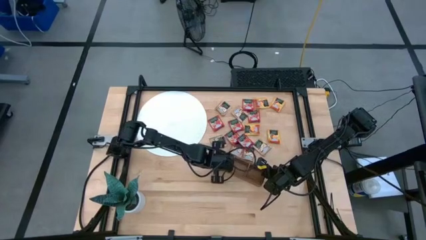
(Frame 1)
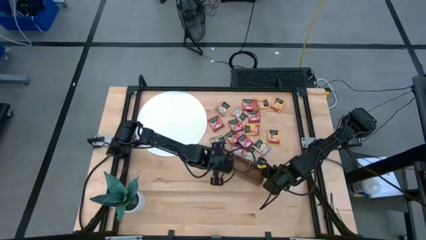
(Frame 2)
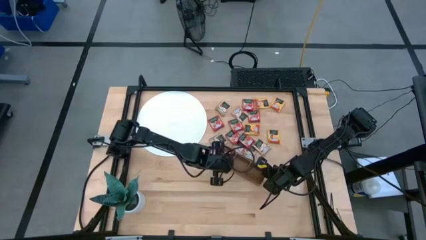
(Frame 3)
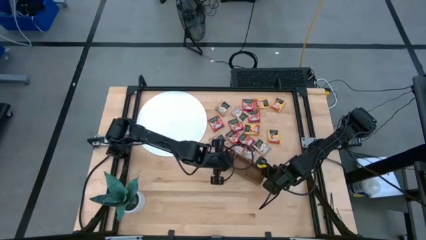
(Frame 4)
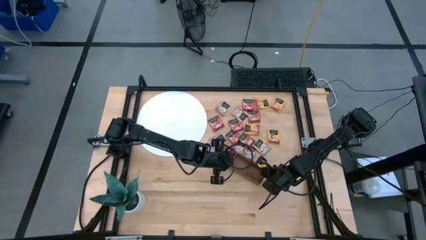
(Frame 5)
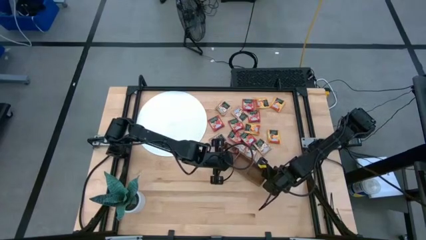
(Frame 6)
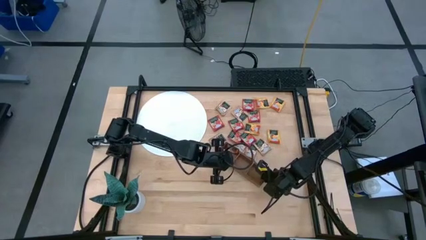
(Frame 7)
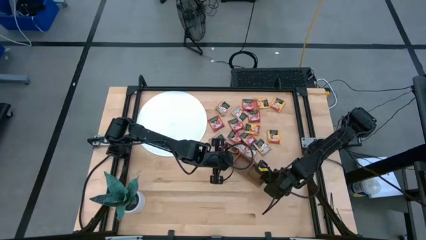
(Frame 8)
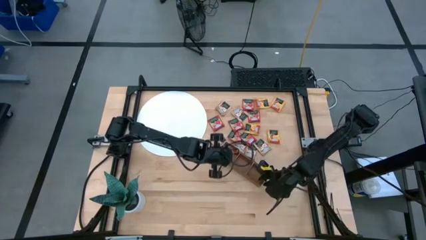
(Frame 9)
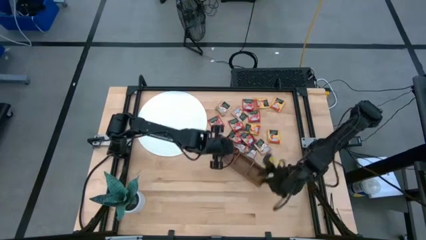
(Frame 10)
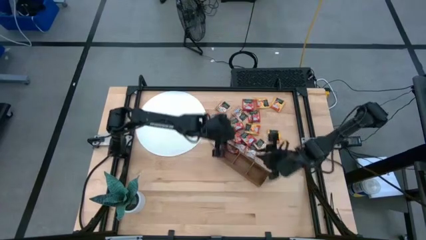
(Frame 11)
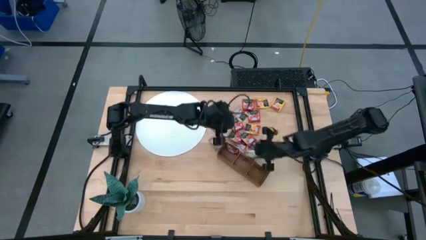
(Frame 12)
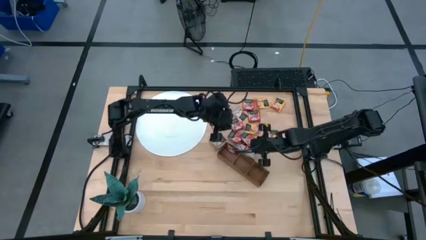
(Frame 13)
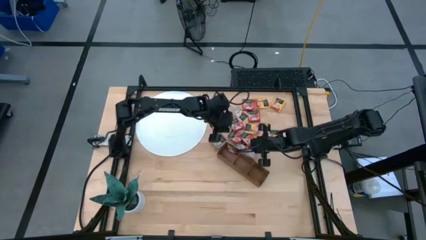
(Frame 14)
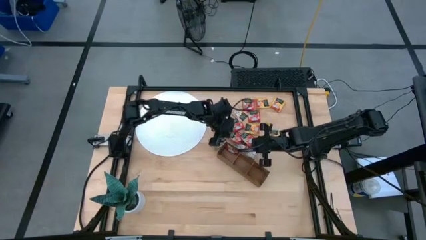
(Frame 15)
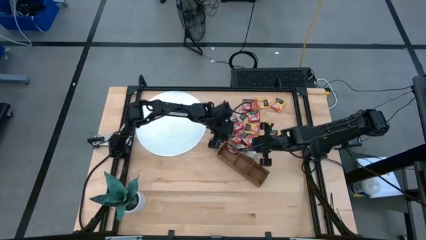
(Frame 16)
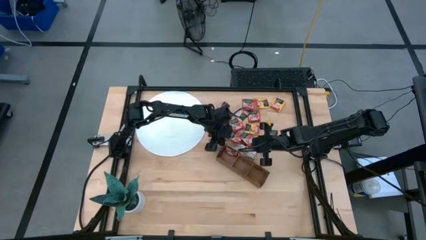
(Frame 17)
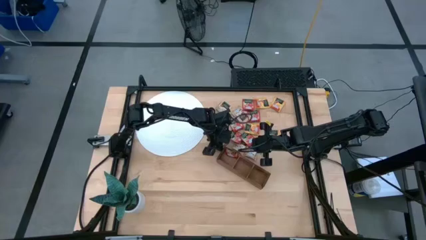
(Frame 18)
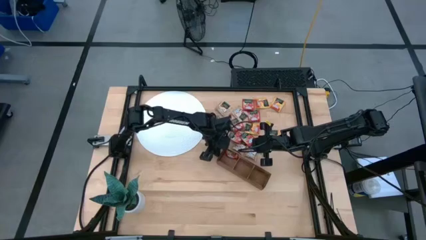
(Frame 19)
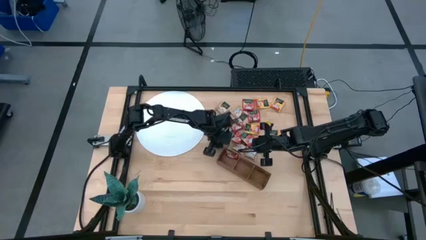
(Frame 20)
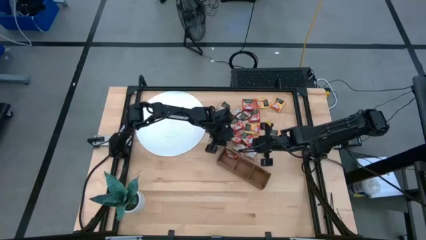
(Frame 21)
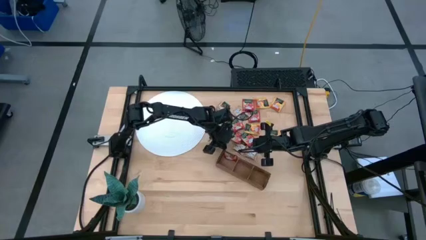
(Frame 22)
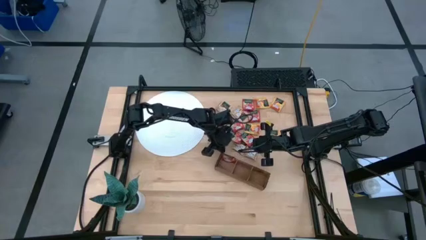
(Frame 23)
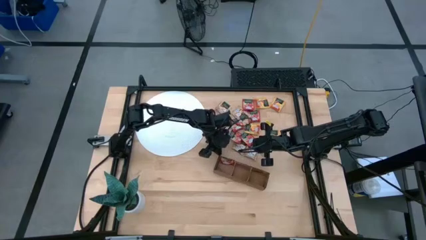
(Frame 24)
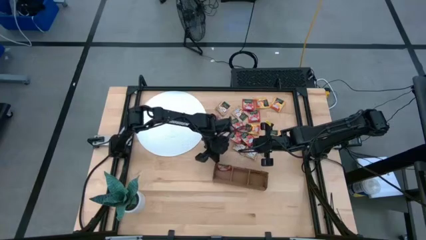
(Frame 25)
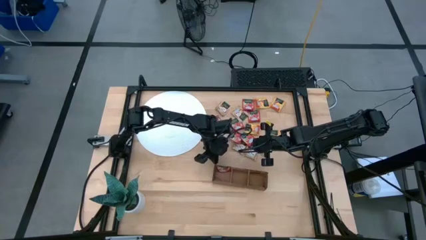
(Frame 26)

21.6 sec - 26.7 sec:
Task: Pick & Place Tea
Adjust the wooden organizer

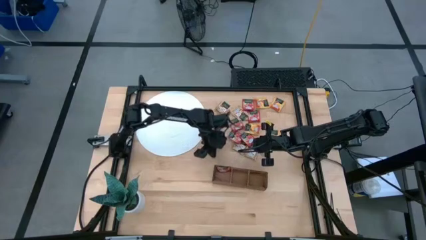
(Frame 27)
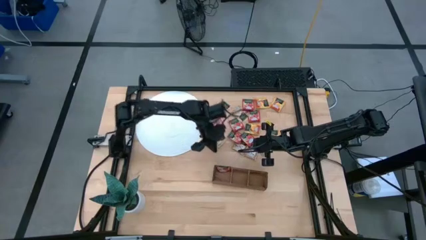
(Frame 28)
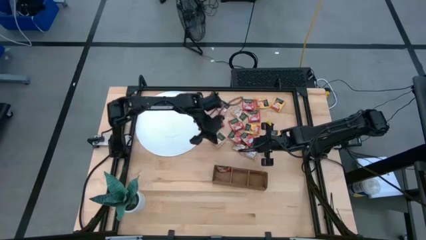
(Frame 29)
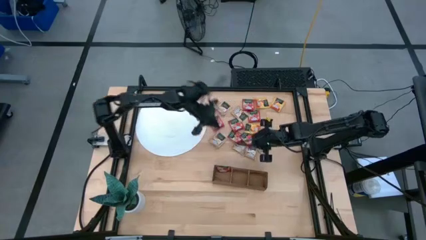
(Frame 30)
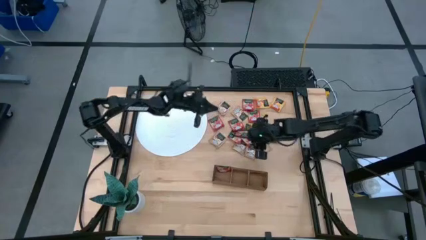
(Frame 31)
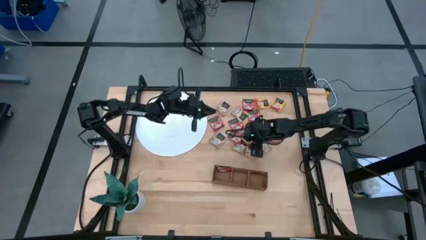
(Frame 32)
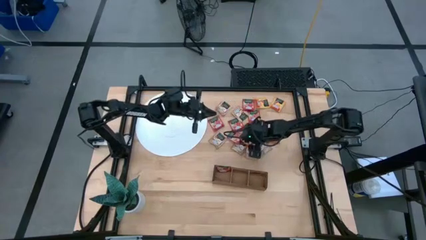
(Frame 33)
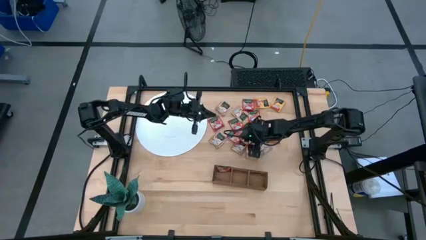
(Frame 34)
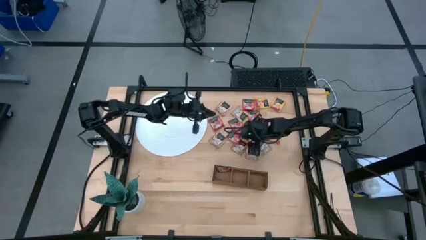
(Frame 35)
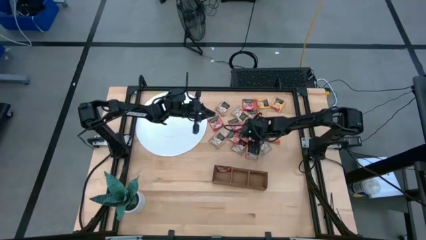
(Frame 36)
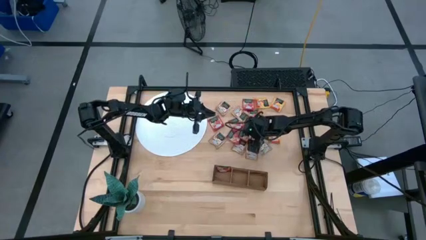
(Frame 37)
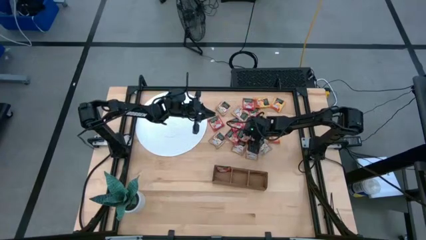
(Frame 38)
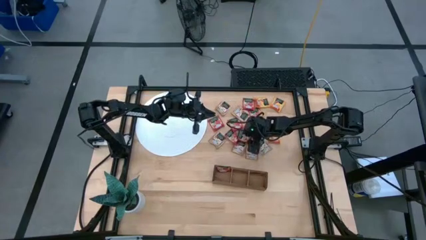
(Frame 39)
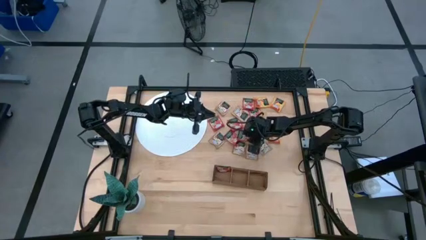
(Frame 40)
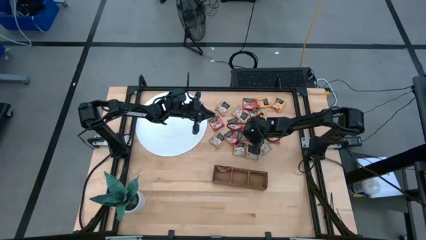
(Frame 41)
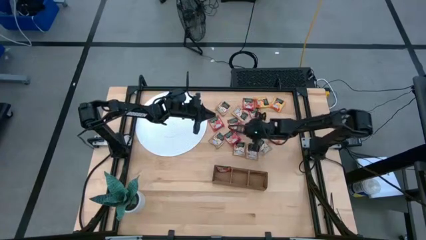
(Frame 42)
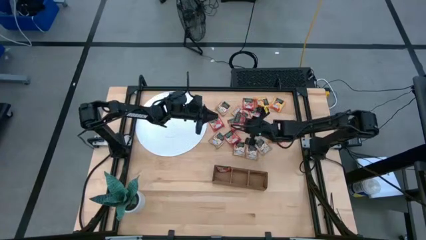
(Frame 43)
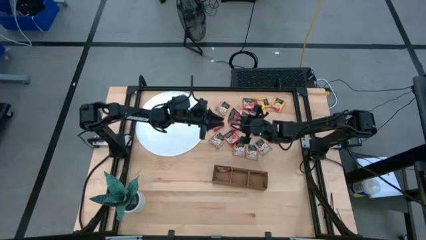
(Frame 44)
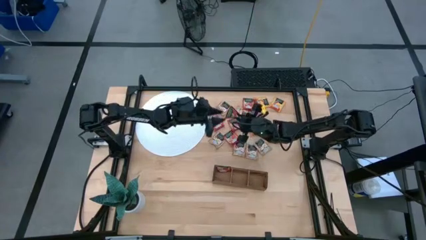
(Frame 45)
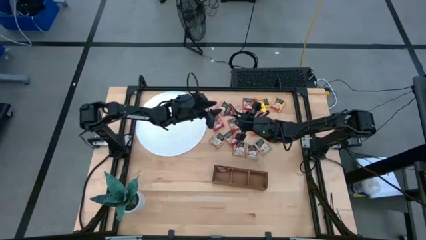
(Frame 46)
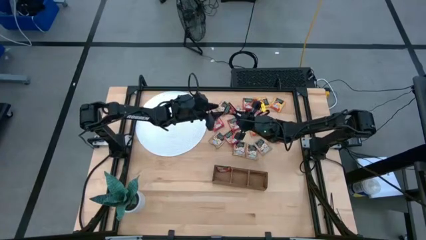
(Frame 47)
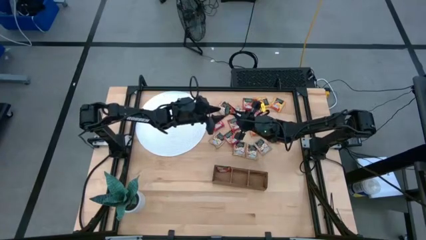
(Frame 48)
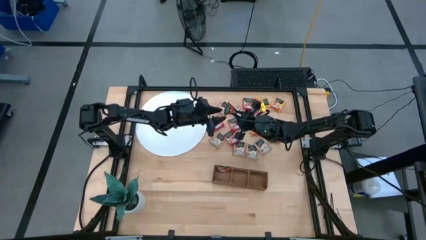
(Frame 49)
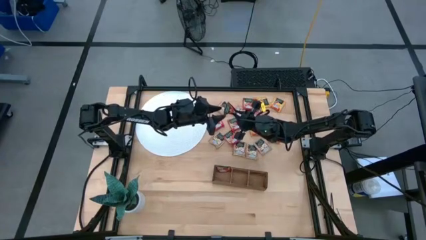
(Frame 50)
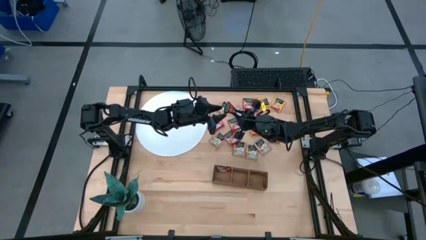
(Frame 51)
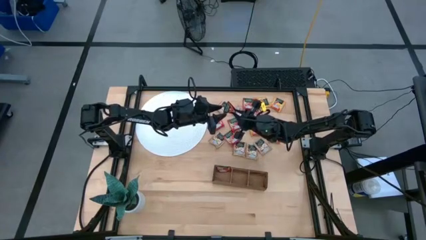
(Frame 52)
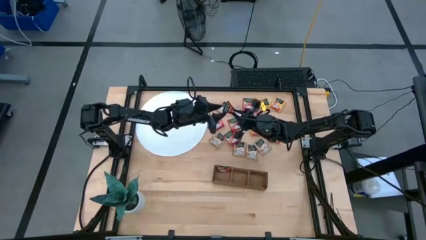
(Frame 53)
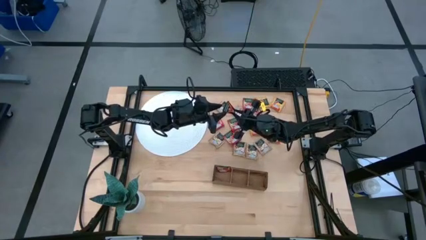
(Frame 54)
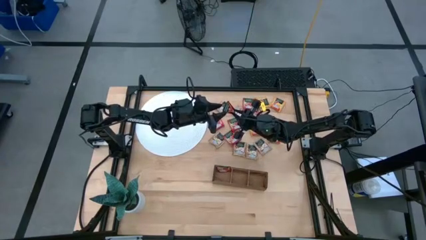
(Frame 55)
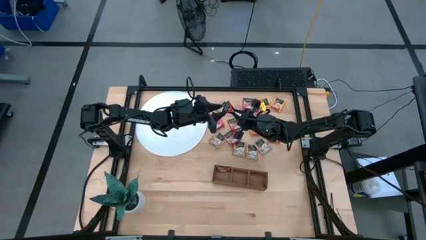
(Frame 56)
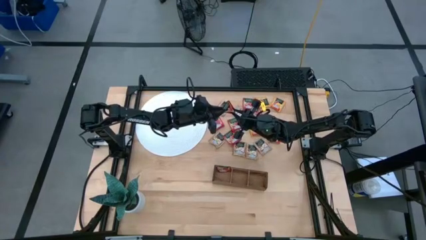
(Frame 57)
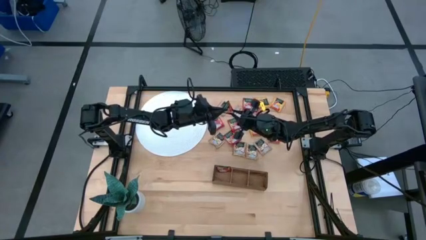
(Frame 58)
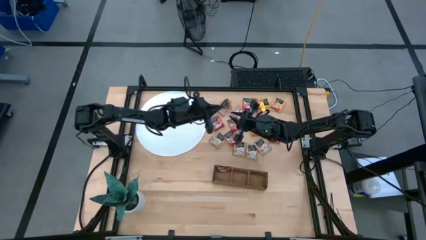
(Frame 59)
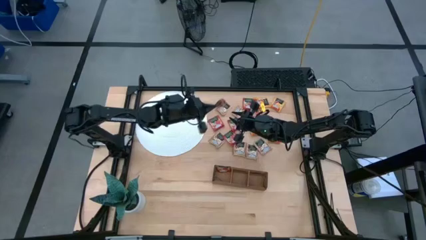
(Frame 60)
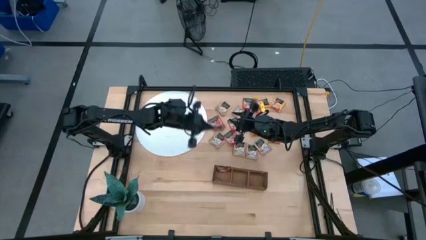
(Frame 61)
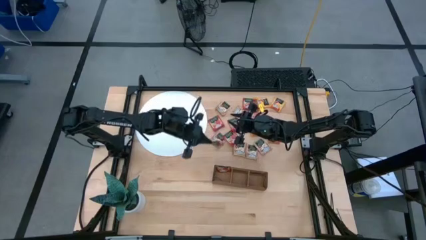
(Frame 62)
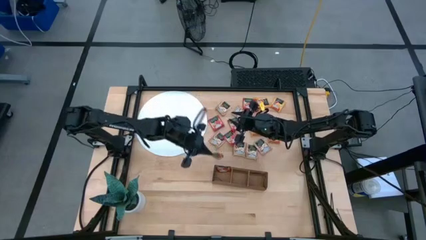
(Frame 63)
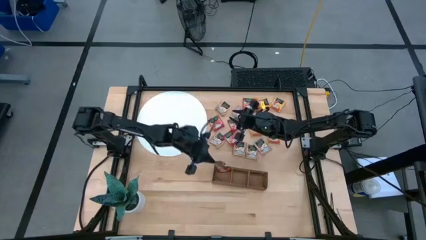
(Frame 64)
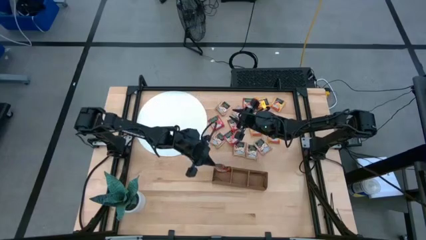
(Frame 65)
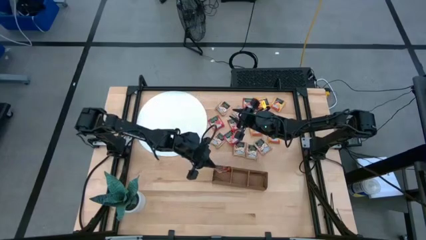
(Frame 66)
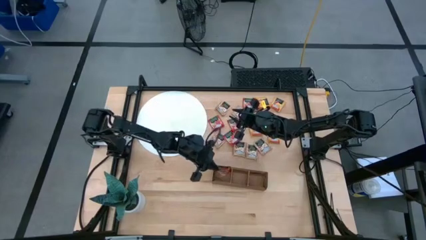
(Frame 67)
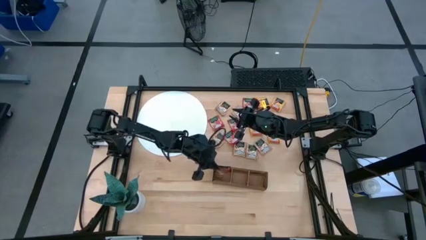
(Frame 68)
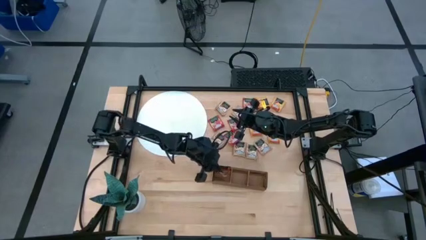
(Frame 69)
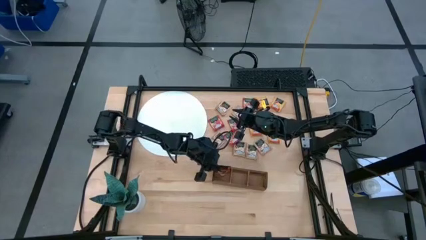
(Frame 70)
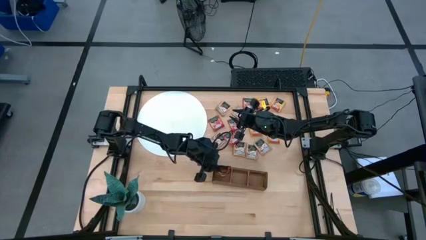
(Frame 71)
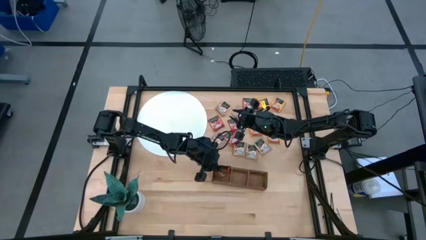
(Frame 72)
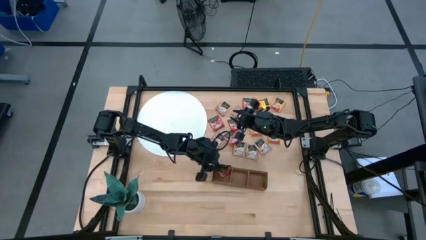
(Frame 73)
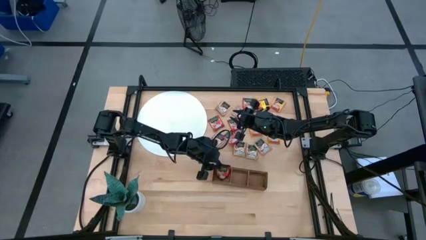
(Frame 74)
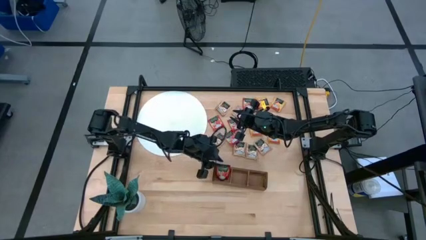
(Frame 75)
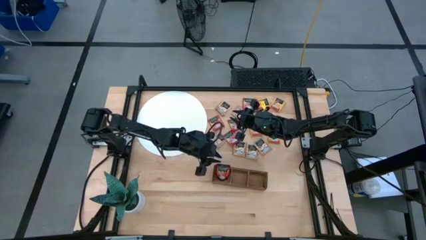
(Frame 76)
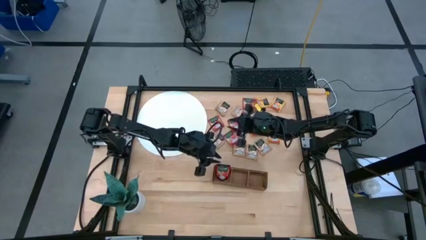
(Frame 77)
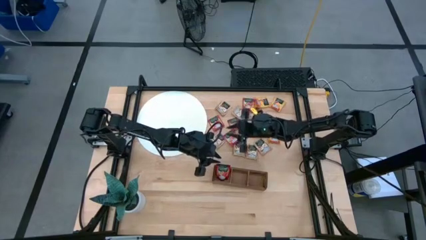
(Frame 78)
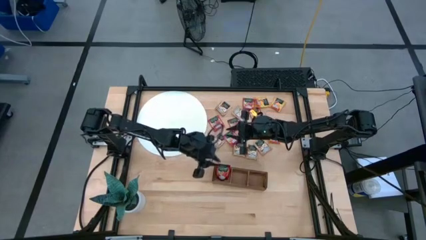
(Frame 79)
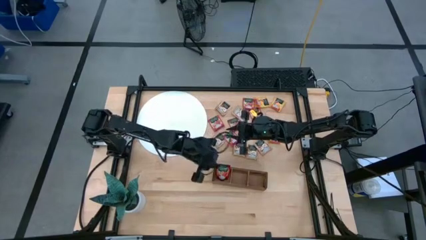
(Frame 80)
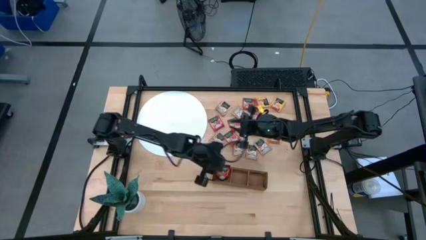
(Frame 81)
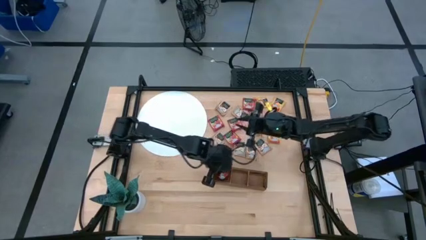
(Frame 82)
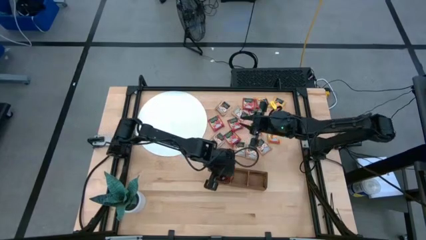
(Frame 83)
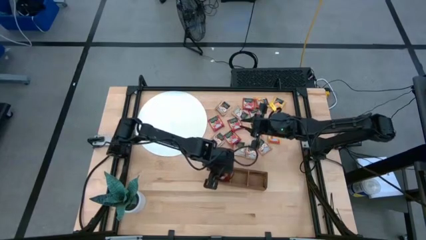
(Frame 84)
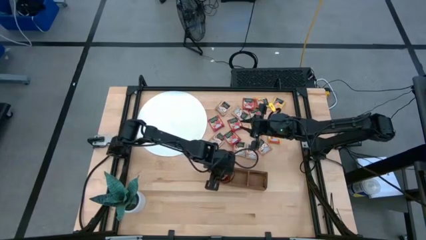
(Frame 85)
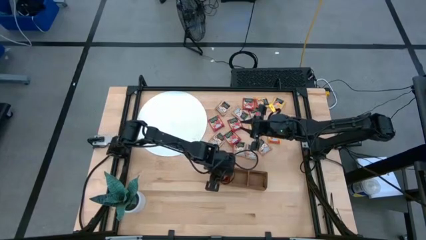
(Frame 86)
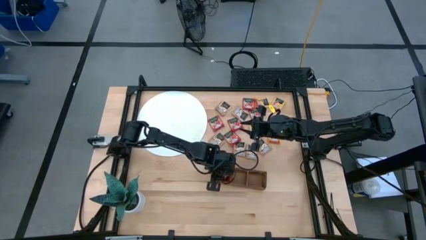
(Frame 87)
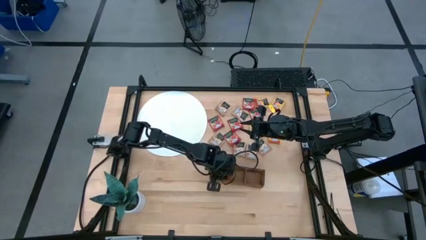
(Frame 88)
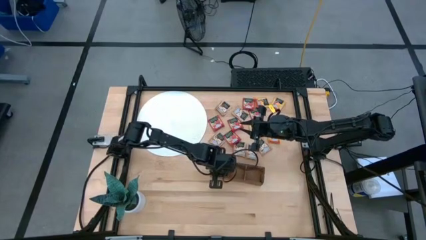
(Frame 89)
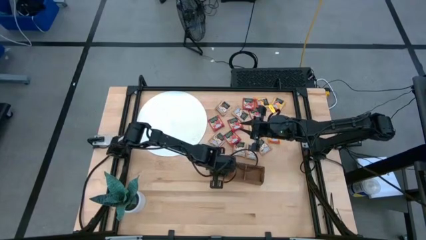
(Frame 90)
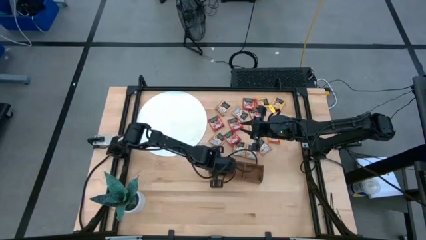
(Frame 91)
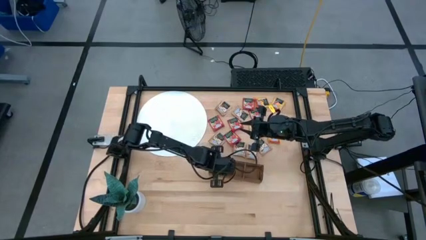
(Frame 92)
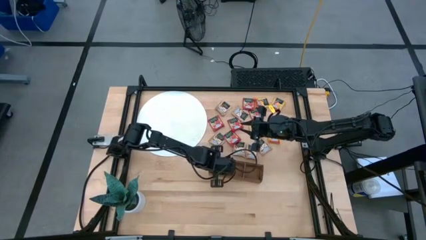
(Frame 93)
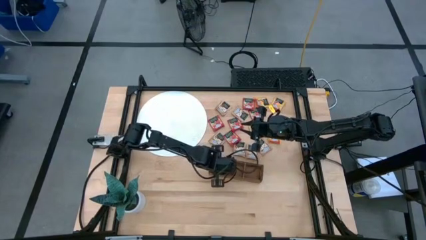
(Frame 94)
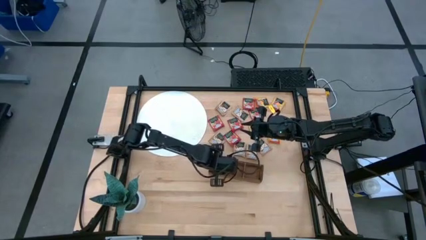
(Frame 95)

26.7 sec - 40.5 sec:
Put the red tea bag into the left section of the wooden organizer
